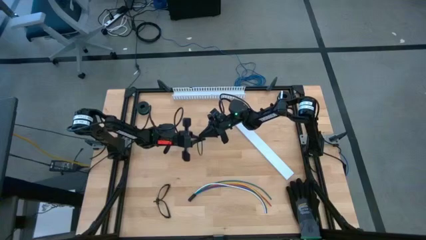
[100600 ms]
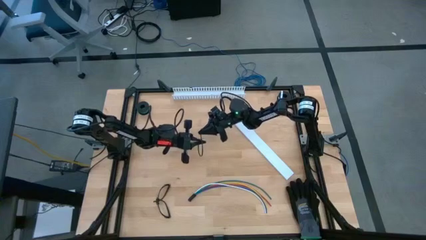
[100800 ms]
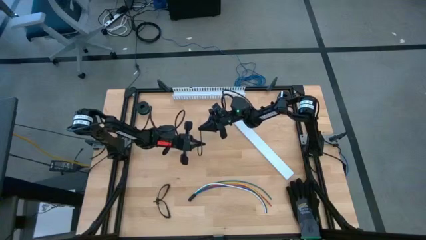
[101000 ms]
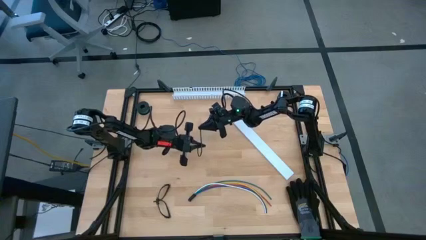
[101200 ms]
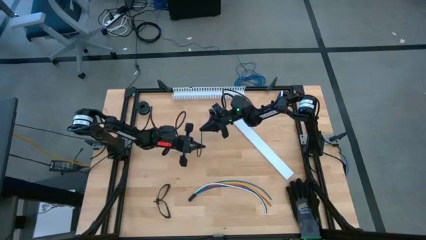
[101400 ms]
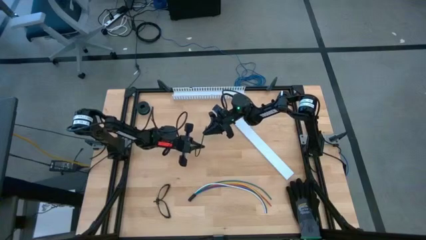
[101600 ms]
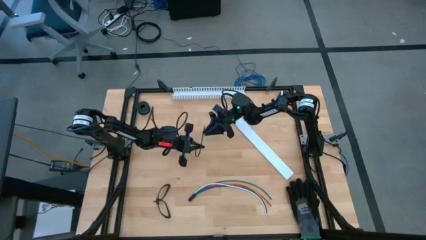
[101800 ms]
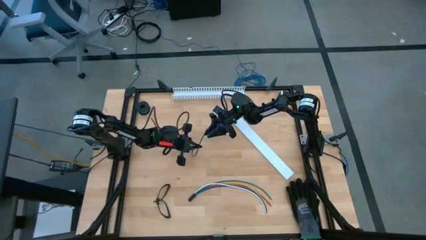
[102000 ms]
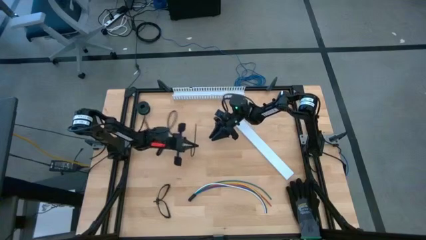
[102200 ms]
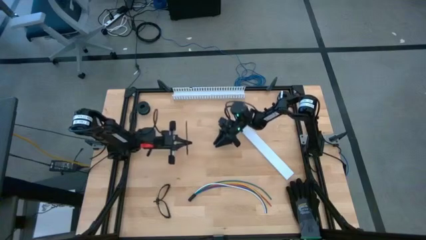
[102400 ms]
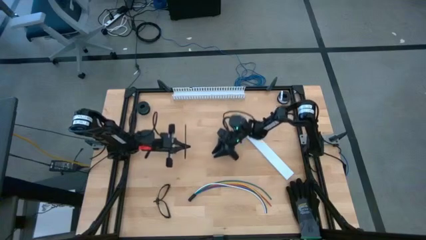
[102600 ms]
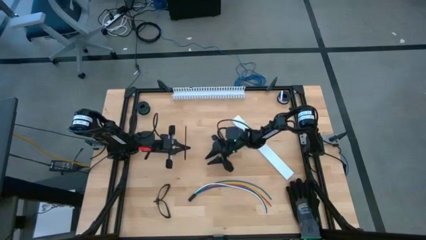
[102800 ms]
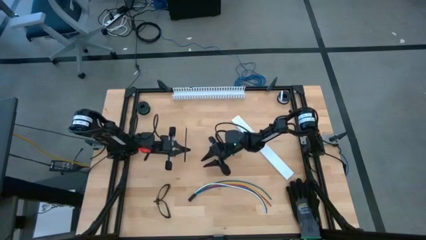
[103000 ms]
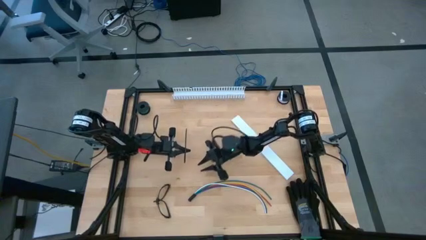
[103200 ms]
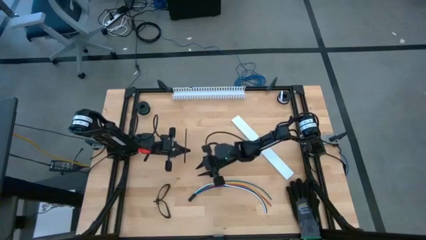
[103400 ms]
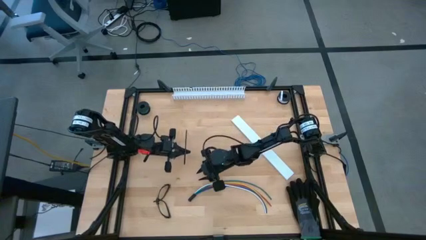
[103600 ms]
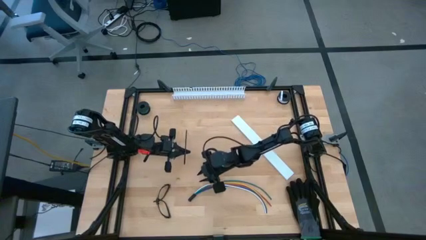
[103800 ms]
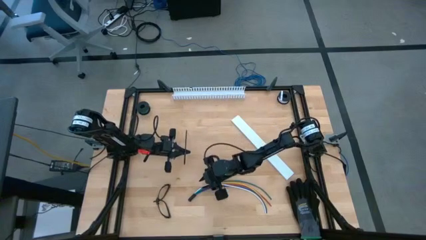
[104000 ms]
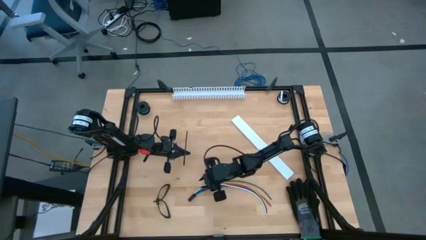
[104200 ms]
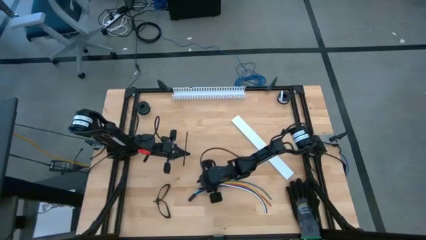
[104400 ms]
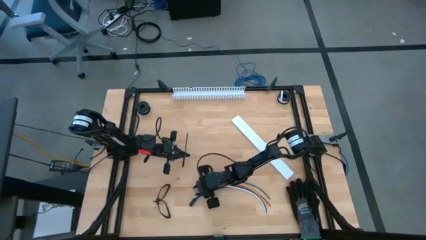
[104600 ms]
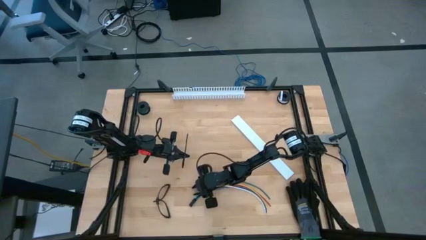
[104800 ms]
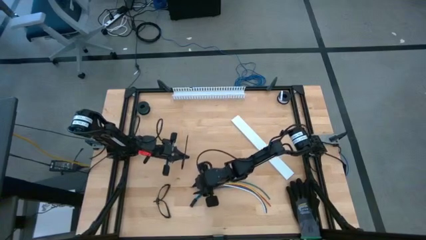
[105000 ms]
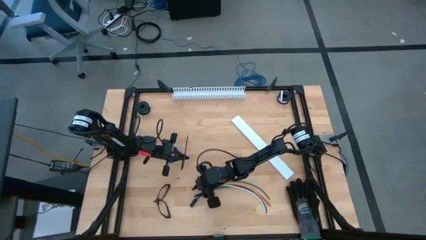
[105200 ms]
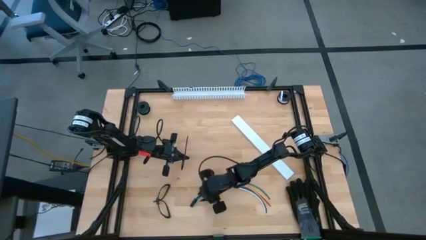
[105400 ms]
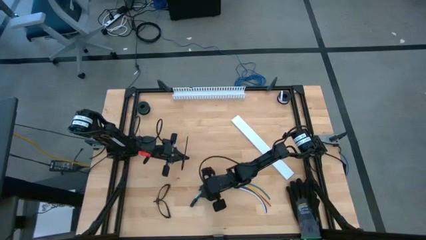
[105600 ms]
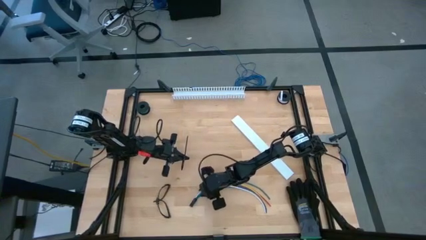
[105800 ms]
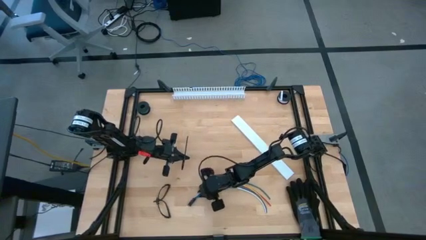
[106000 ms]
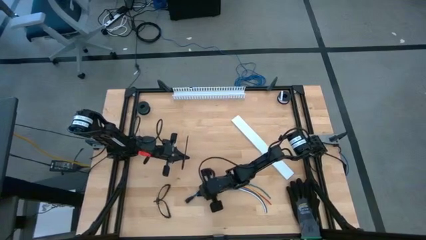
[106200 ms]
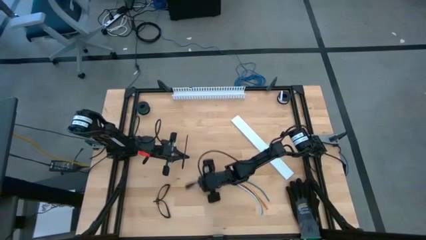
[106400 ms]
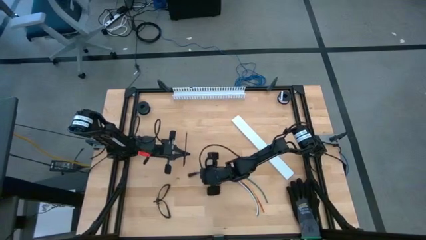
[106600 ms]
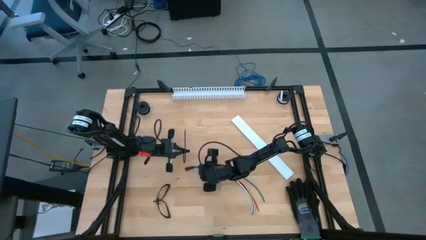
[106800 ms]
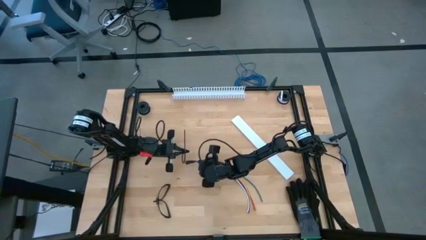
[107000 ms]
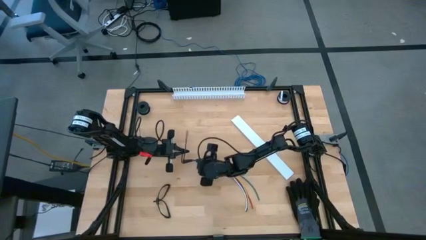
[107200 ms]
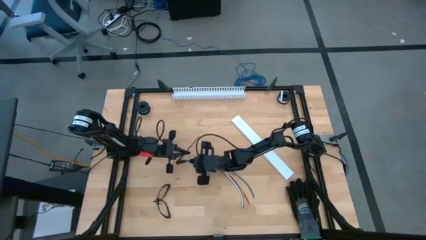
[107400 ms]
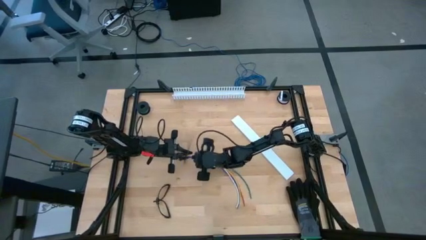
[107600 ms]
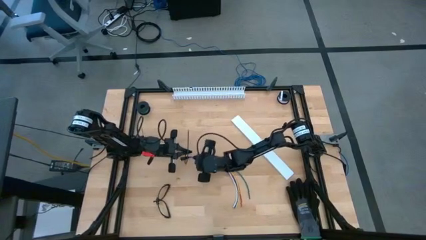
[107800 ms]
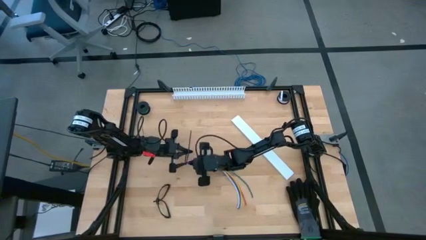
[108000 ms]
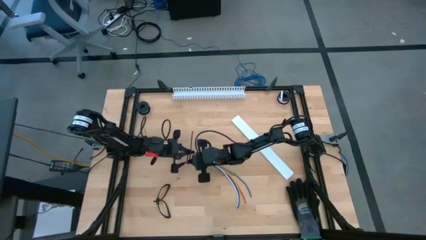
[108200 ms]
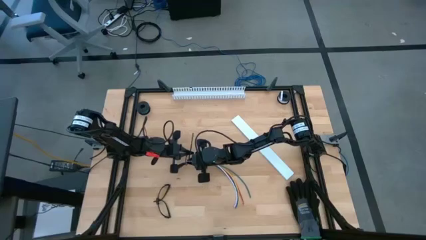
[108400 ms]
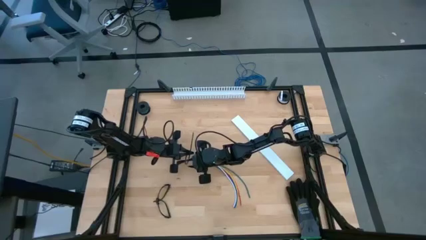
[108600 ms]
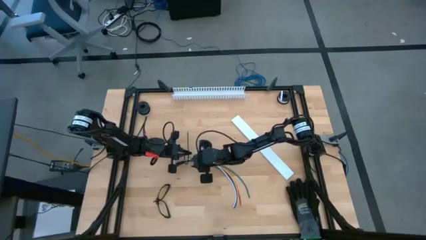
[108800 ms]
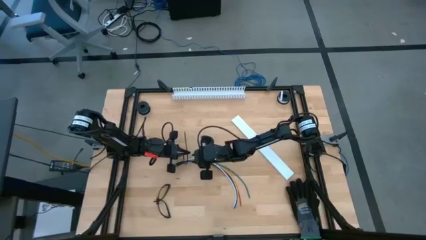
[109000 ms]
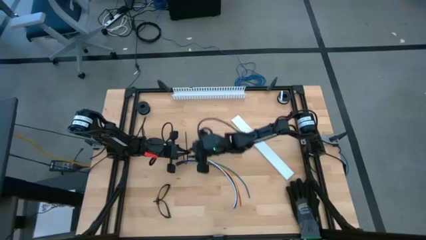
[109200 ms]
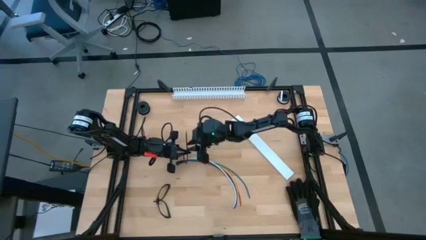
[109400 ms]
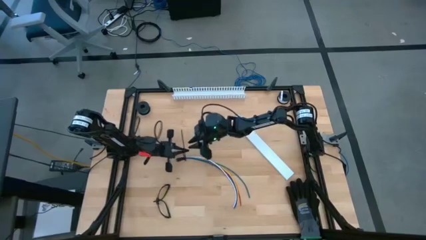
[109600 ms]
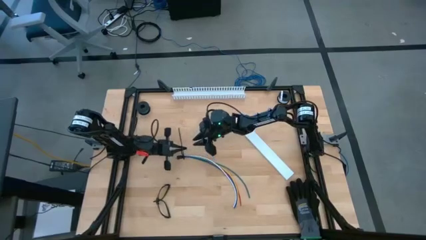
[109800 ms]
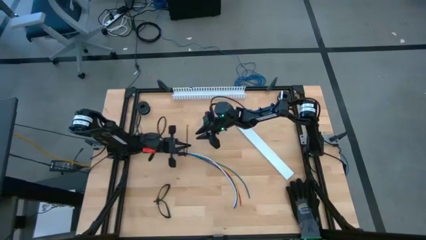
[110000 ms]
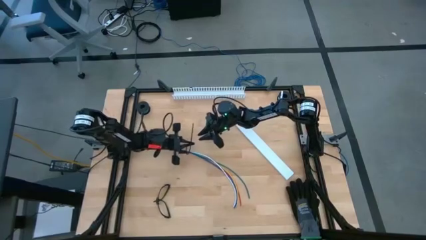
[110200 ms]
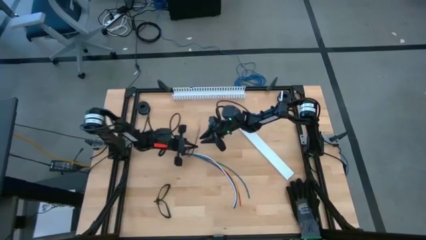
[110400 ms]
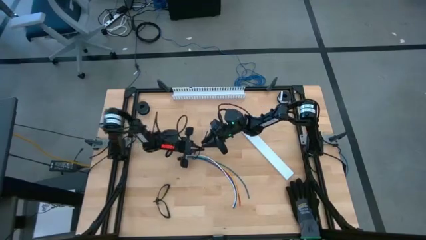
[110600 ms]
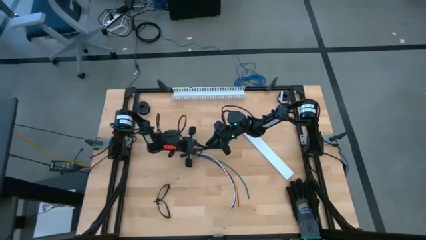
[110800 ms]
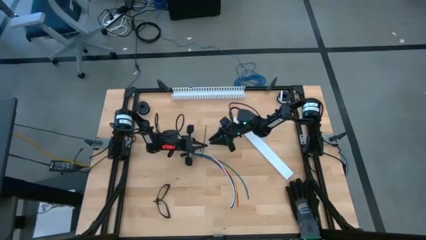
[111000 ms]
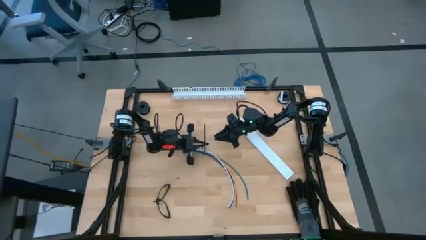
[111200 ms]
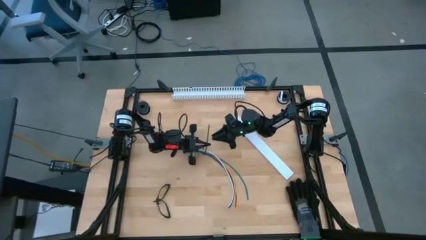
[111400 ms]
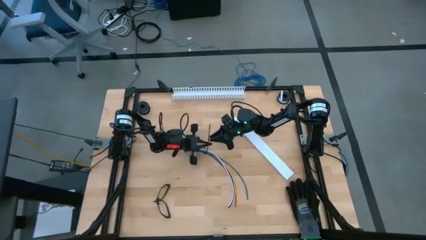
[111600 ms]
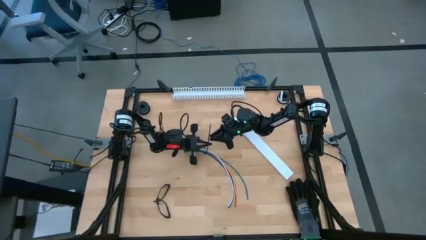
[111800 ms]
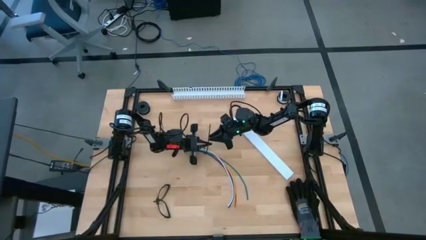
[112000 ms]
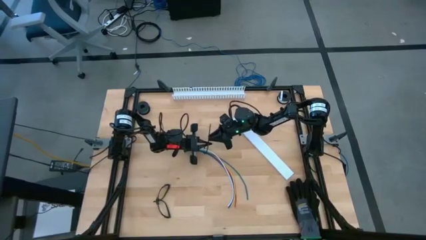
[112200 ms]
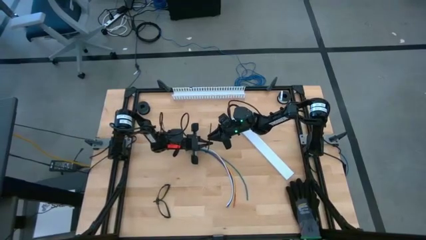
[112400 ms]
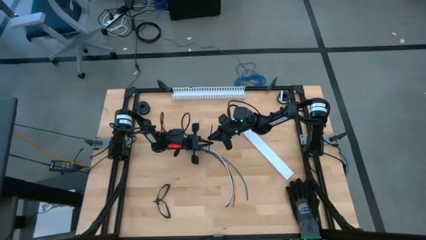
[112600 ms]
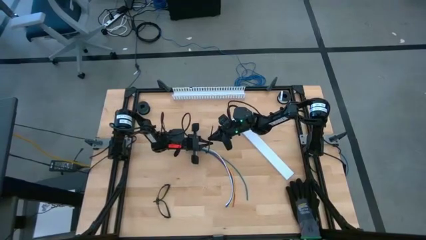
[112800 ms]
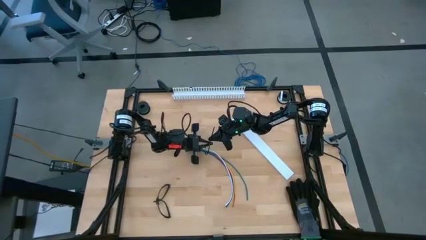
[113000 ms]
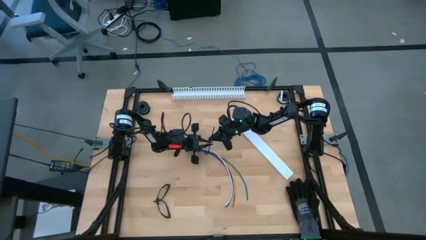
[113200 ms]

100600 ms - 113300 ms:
Task: Ziptie cables
Wrap the zip tie around the cable wires

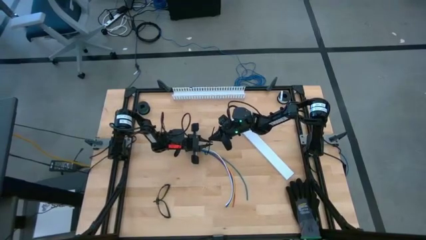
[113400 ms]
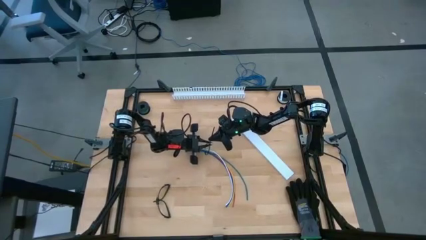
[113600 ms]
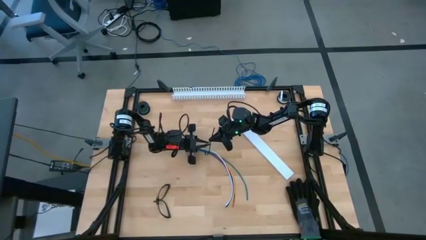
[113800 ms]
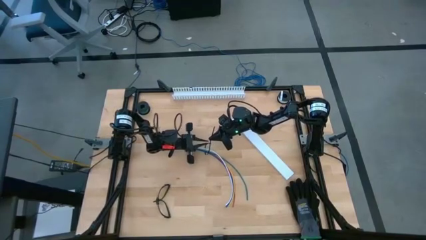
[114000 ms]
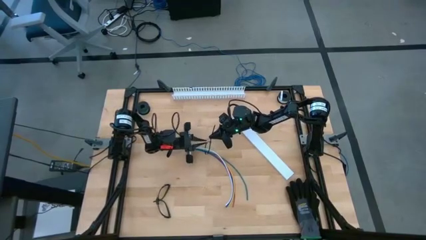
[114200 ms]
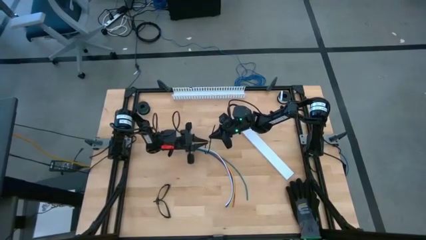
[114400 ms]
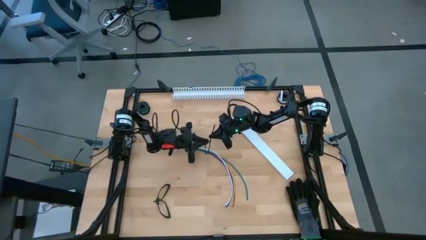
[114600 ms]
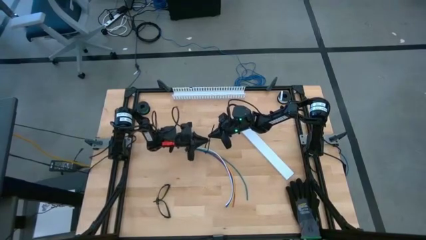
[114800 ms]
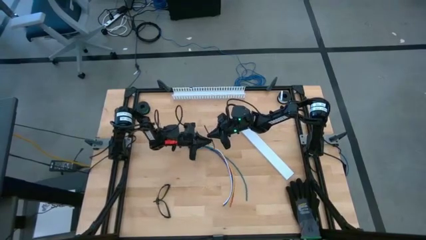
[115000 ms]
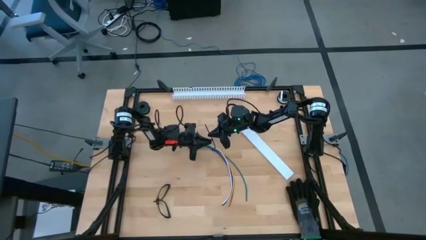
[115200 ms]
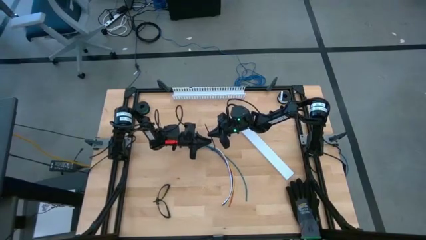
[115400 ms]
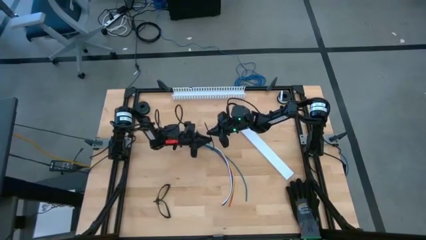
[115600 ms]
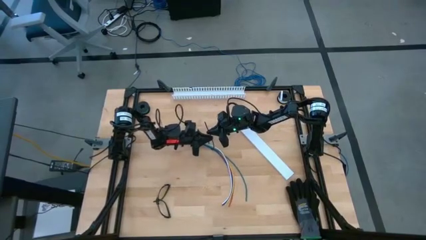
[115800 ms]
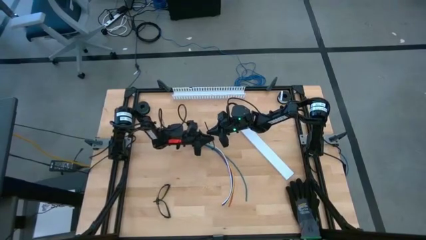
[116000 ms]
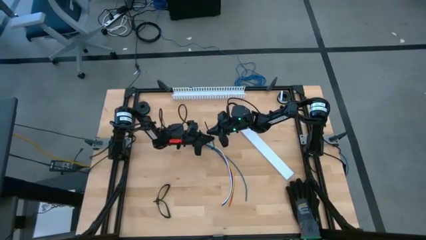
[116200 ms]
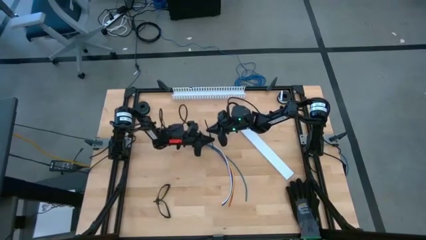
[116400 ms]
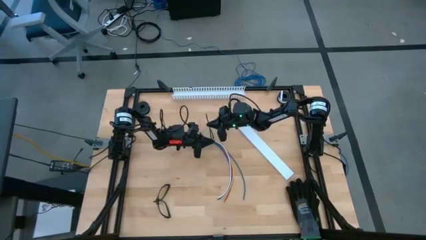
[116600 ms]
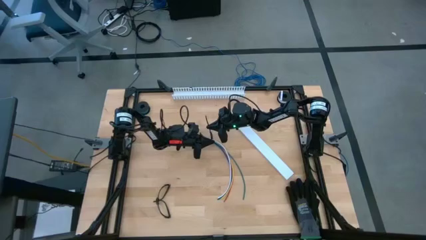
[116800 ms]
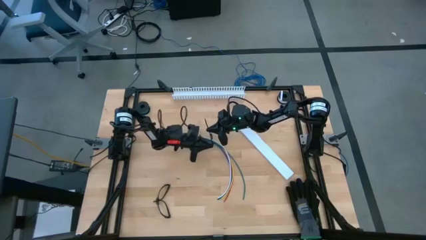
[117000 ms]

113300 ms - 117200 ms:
Wrap the zip tie around the cable wires
